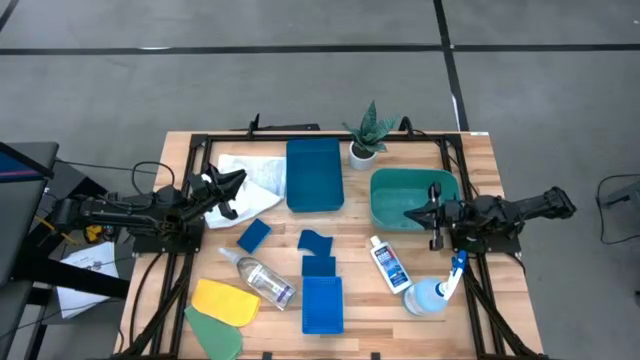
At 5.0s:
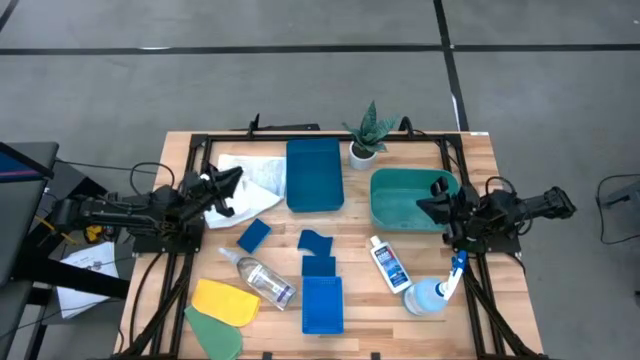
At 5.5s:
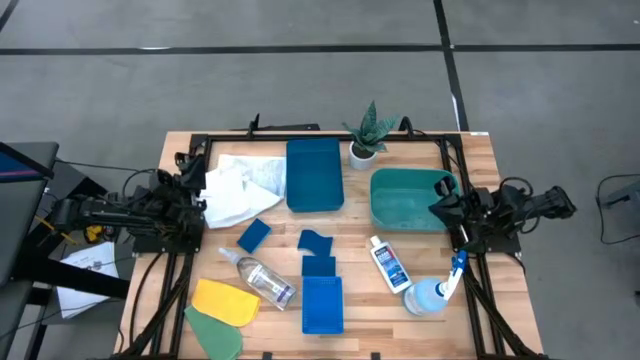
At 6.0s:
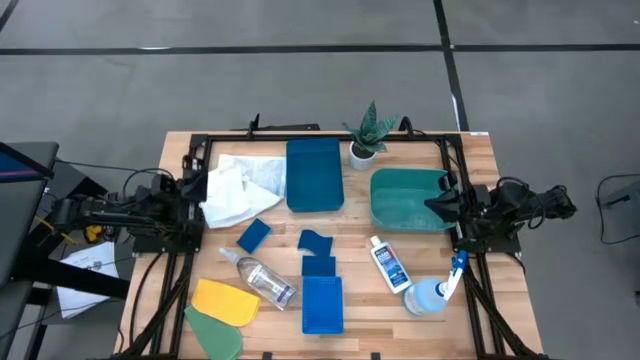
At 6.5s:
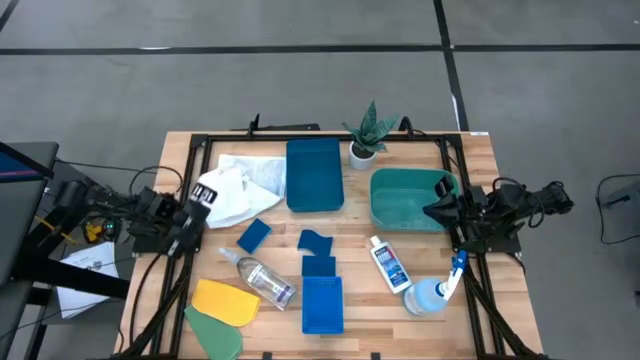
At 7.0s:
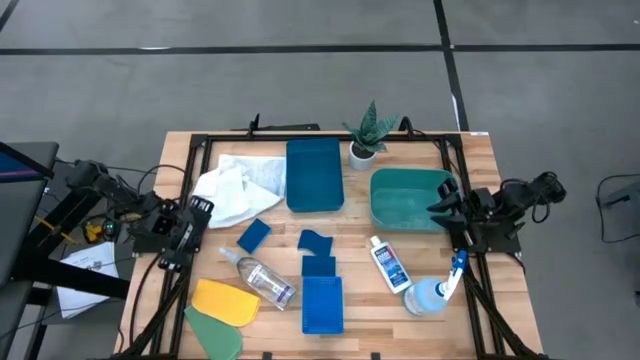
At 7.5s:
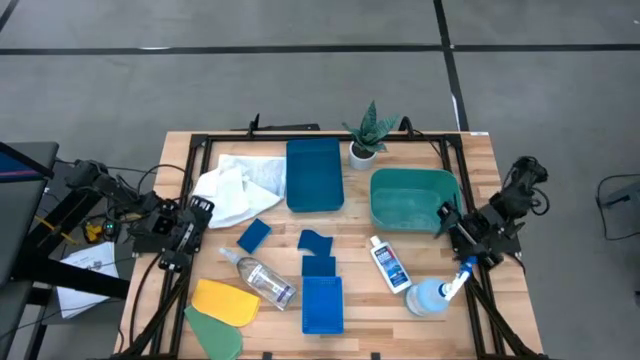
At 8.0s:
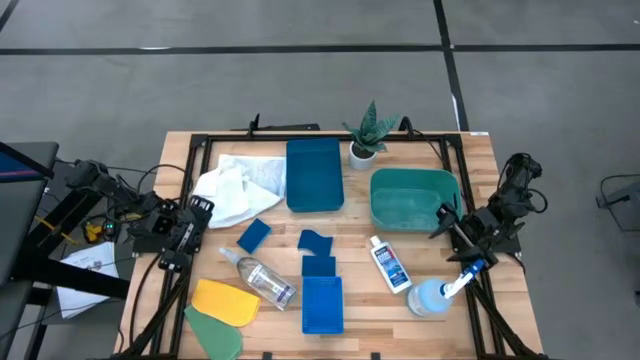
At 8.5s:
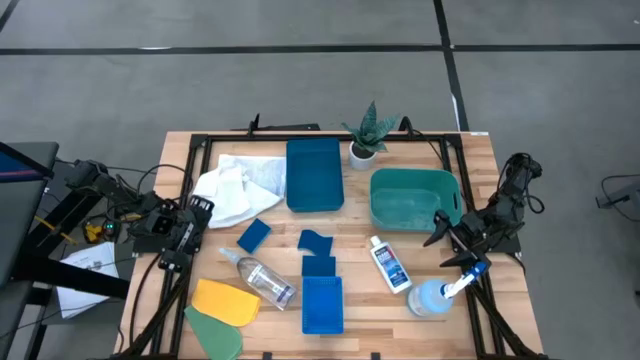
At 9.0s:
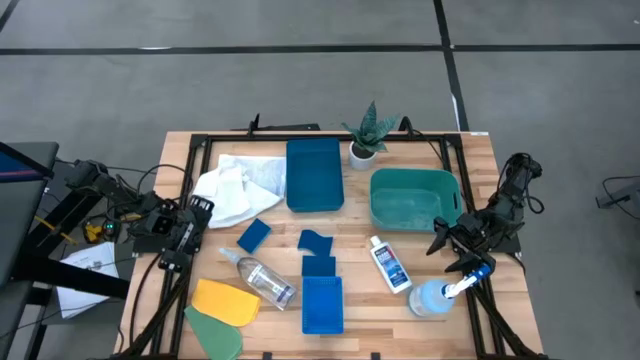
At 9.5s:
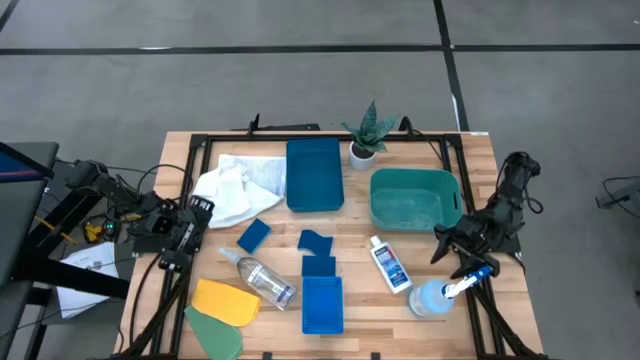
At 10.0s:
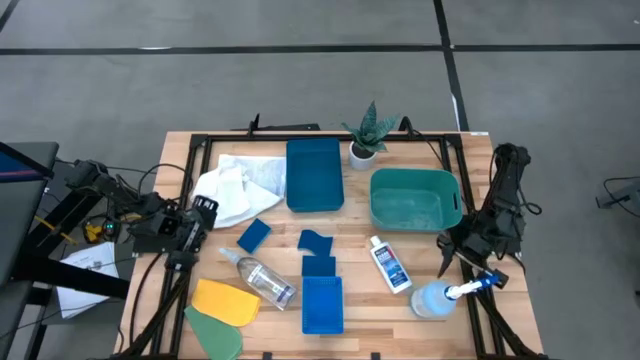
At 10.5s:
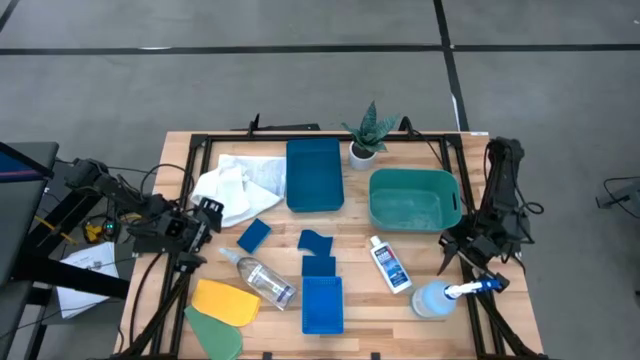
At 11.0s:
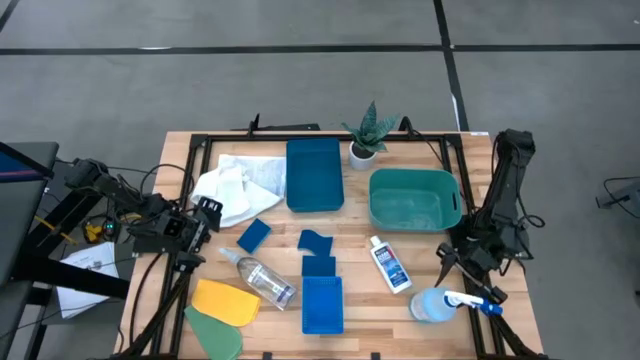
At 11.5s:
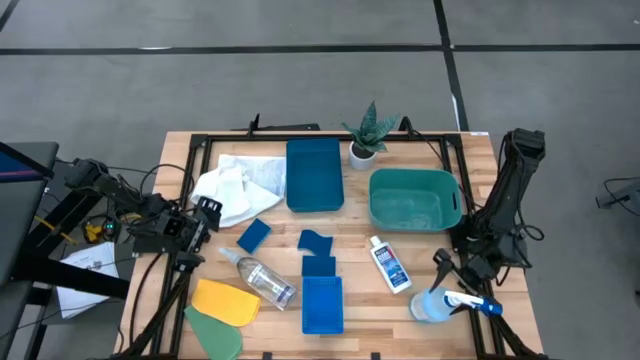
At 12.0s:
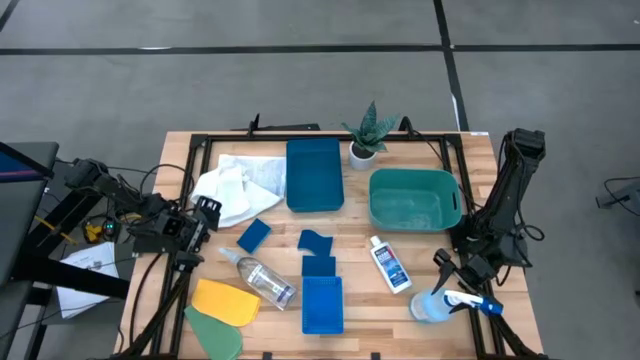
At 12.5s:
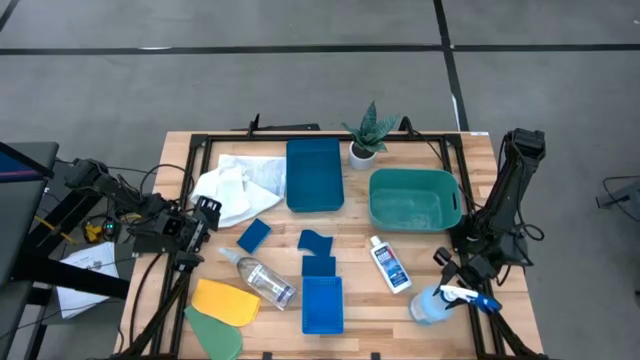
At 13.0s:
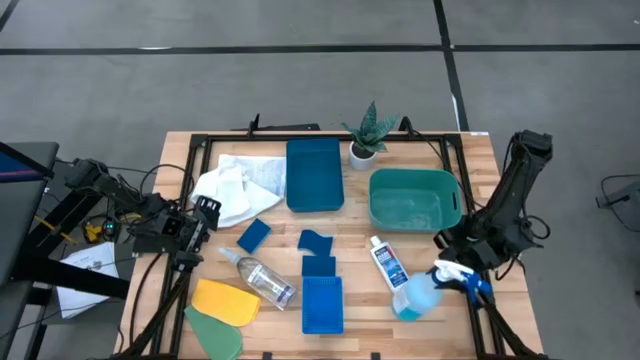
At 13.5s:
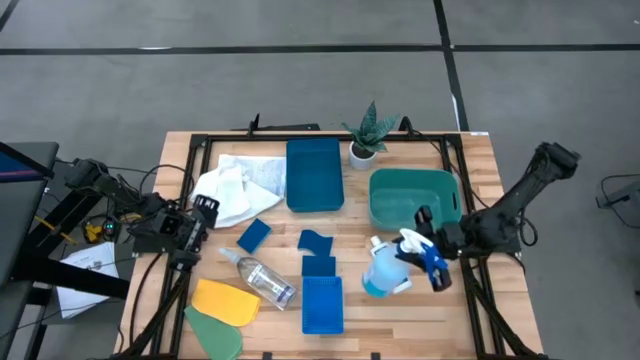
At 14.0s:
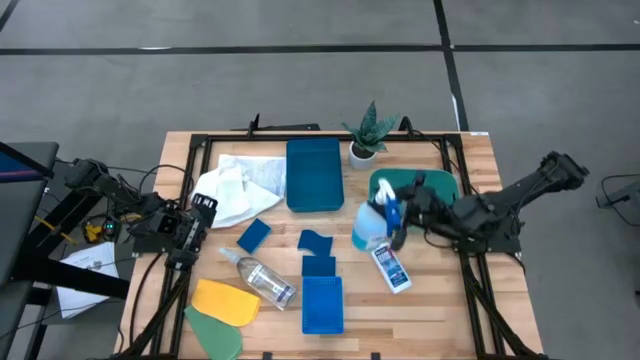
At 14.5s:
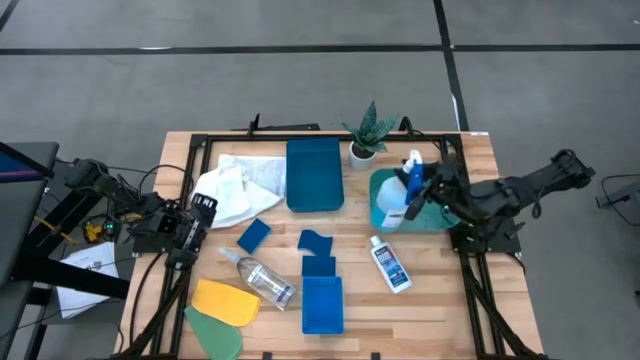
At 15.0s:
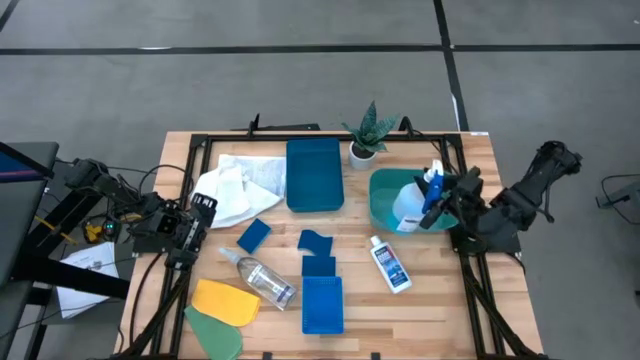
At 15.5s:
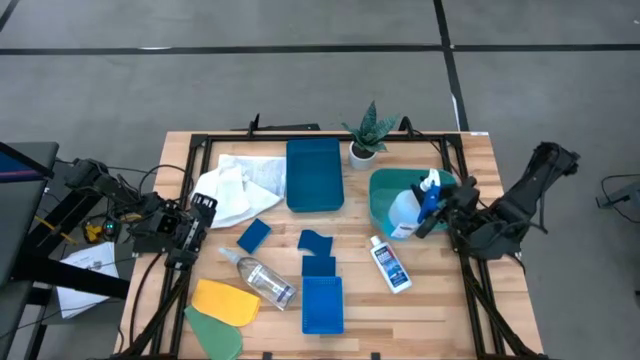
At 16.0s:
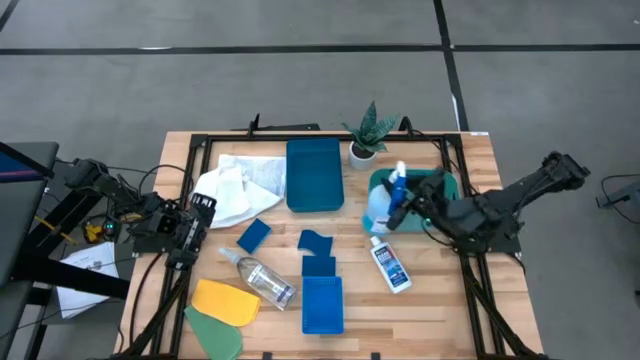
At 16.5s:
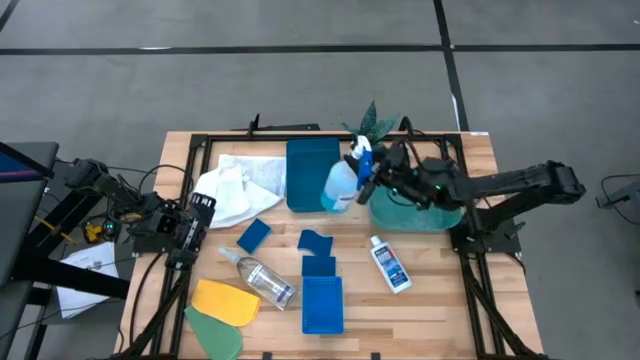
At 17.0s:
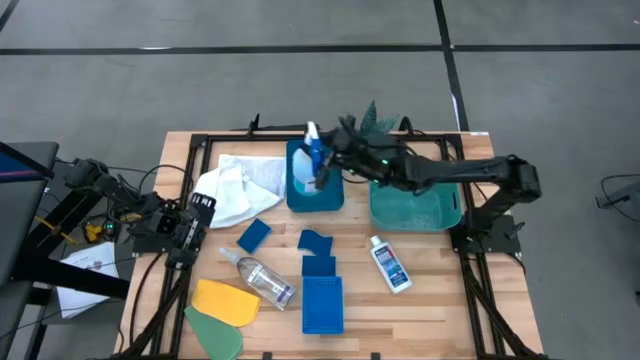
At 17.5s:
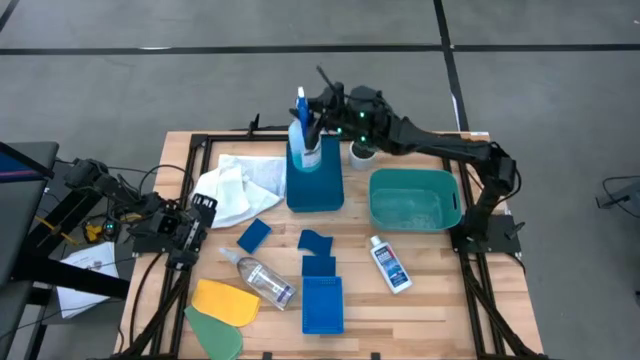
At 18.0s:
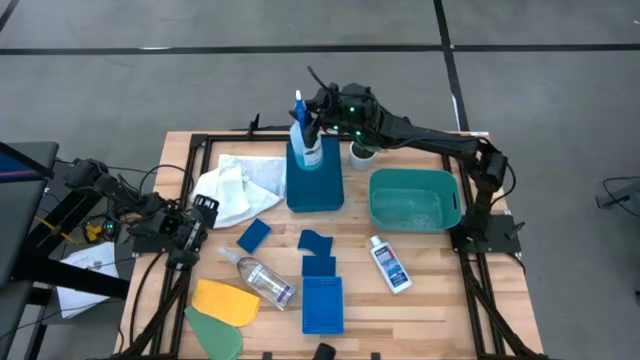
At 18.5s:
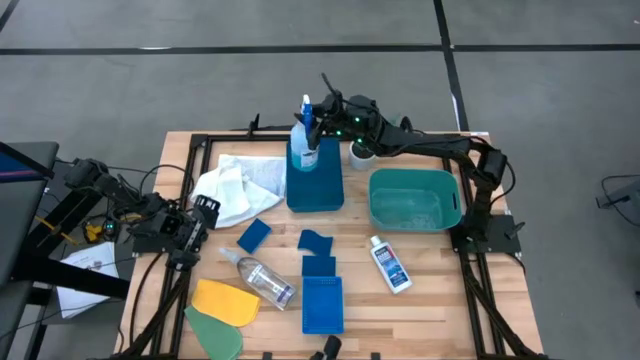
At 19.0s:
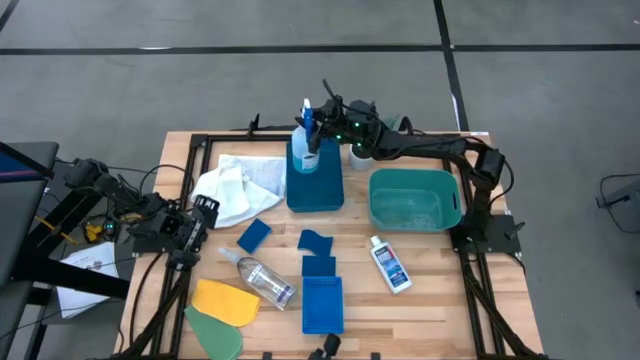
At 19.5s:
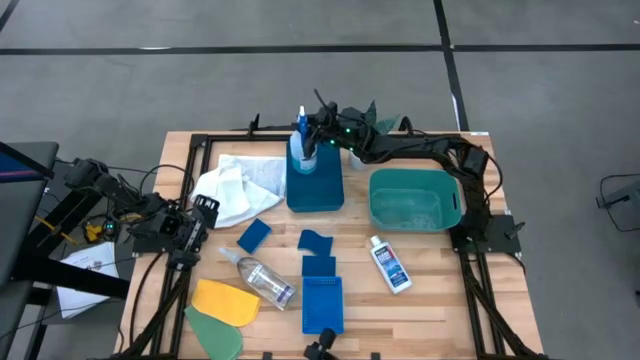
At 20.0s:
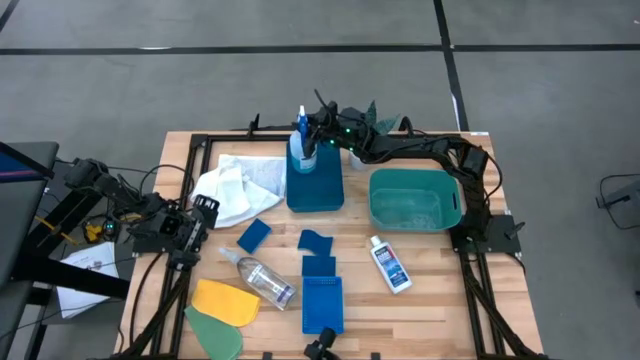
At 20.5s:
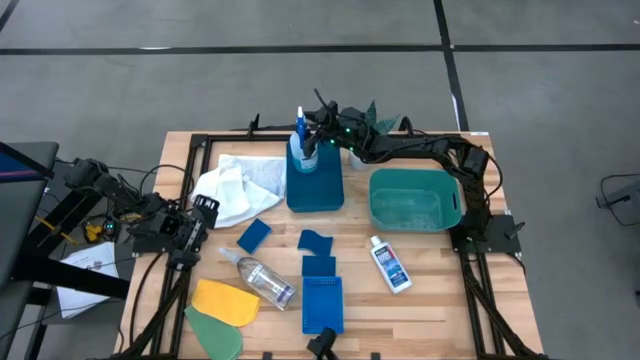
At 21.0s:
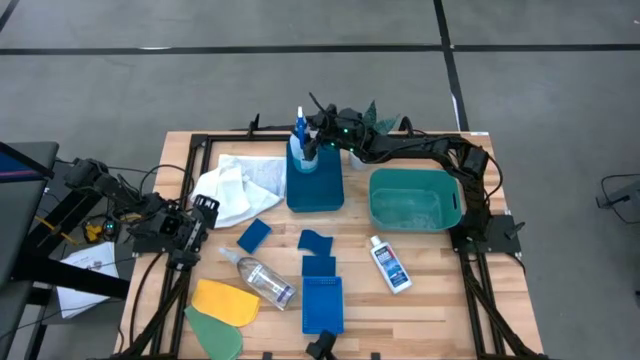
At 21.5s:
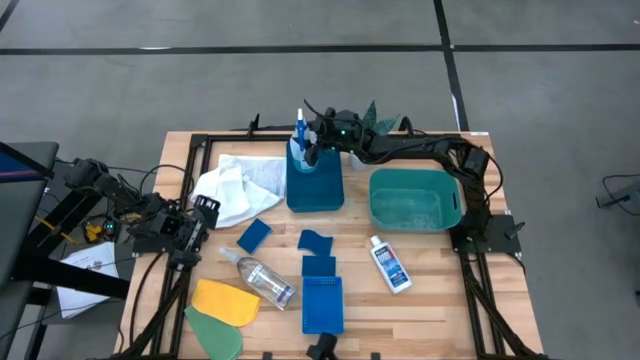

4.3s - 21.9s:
Task: Pick & Place Kitchen Items
Put the blue spray bottle into the blue bin

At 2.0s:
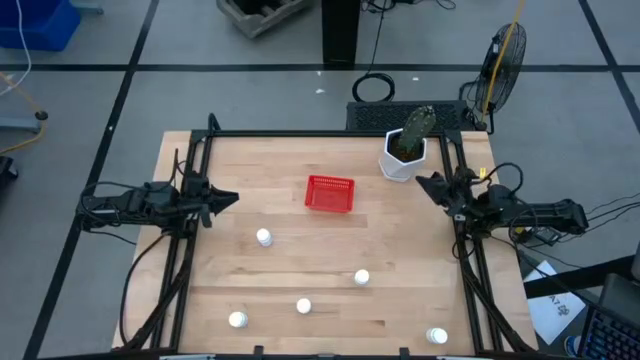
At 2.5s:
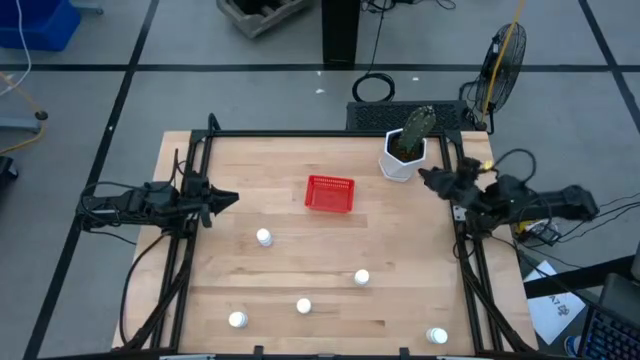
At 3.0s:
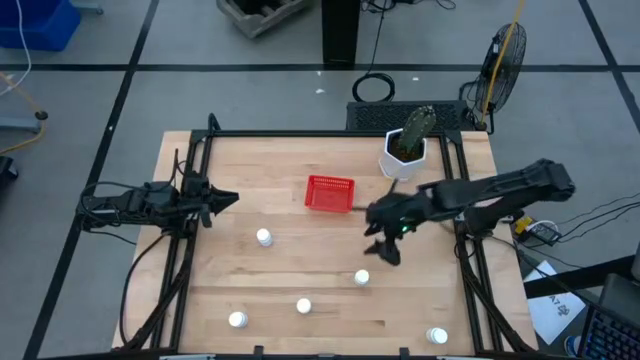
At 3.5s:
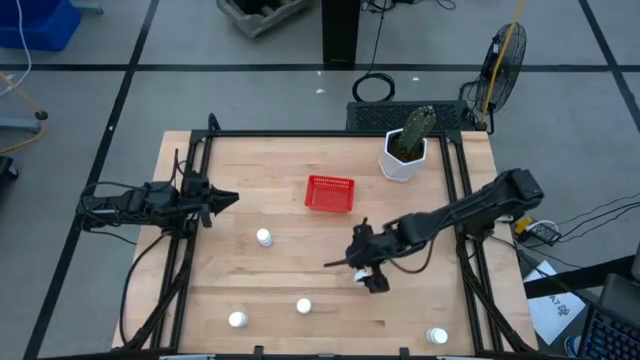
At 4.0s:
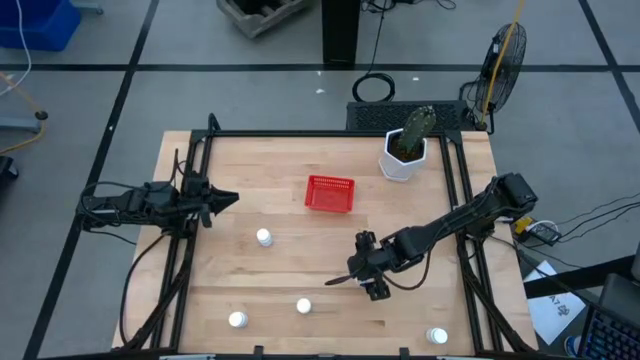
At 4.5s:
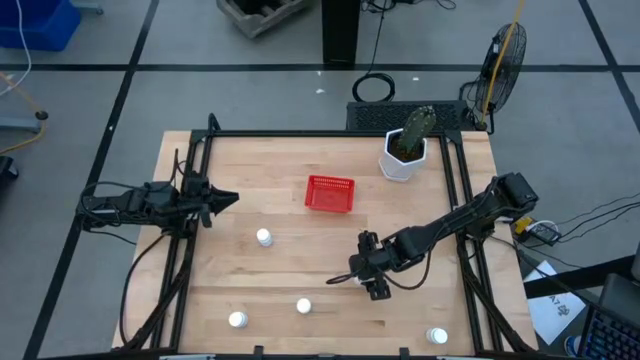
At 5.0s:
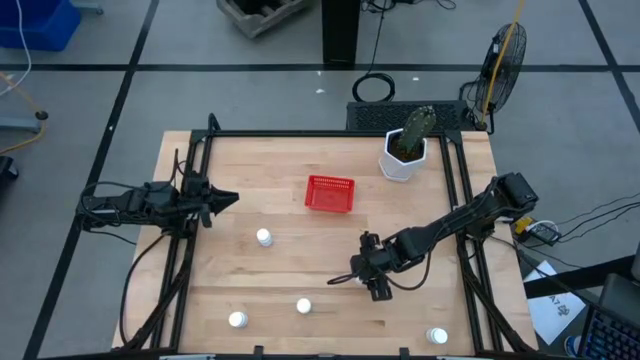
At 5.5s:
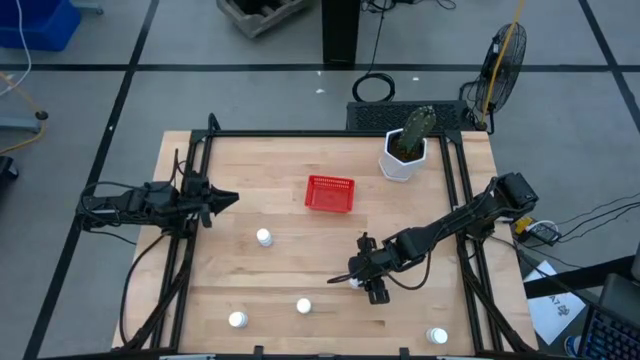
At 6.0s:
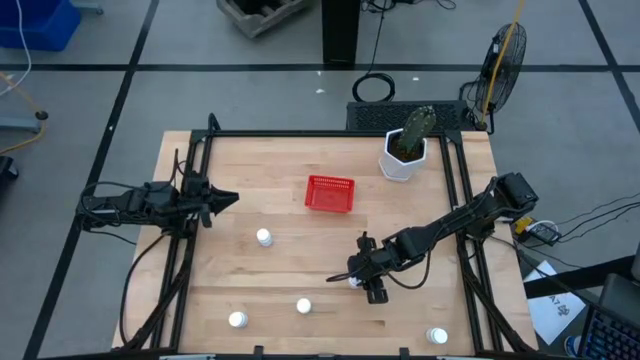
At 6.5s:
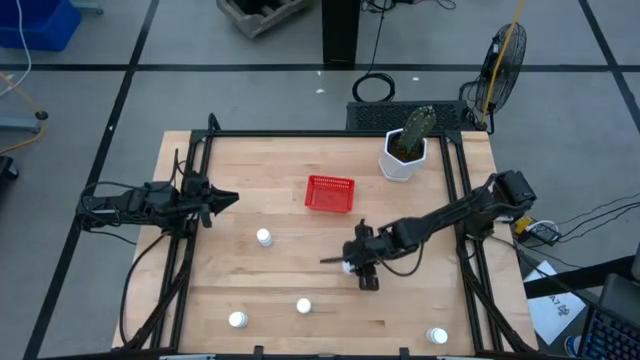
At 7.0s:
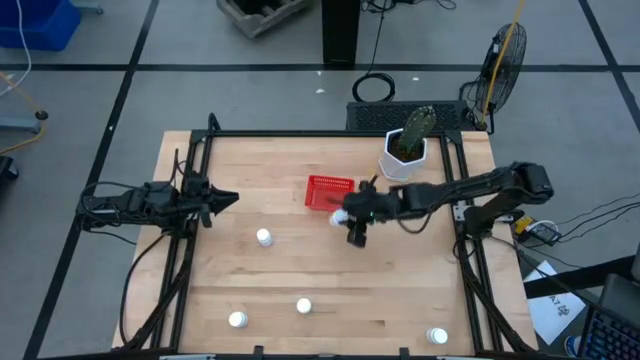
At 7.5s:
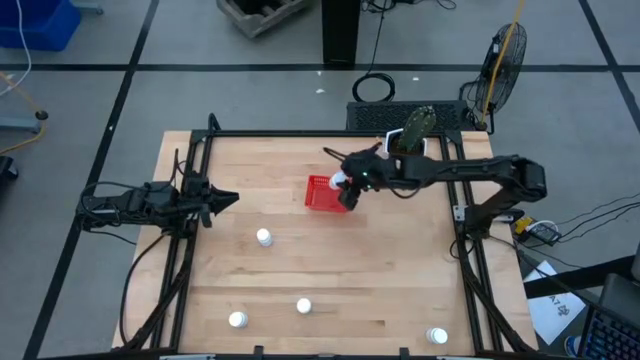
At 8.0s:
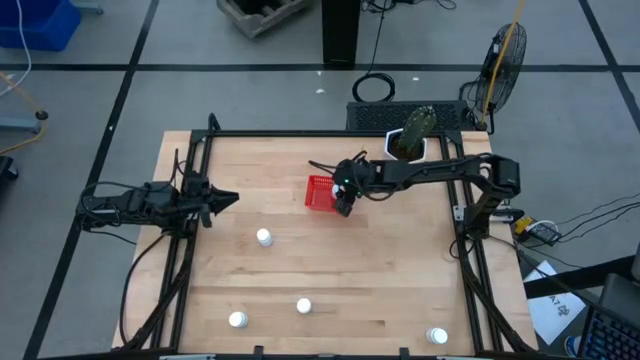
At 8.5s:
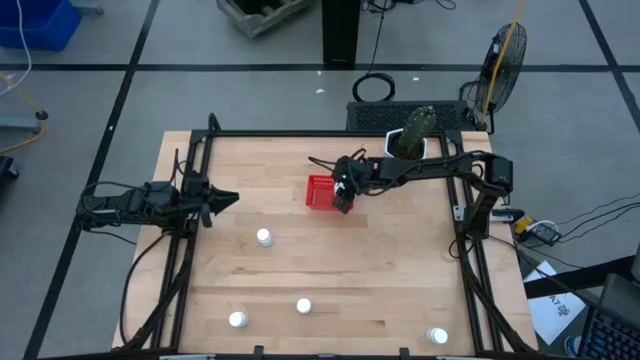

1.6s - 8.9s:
Task: Pick and place pill bottles into a basket
Put the white medicine bottle into the red basket
